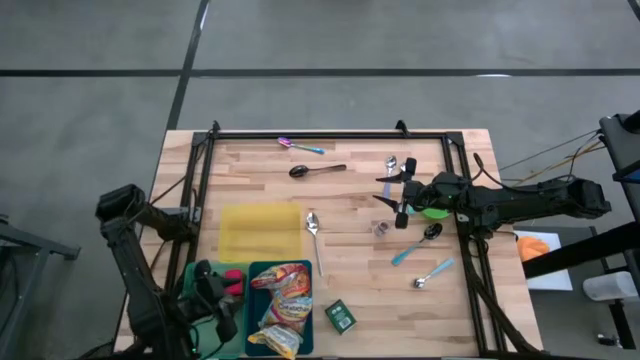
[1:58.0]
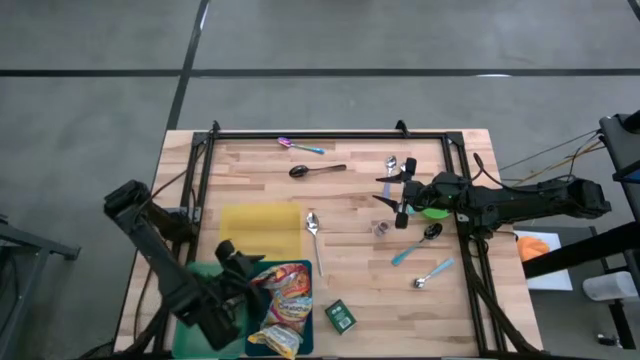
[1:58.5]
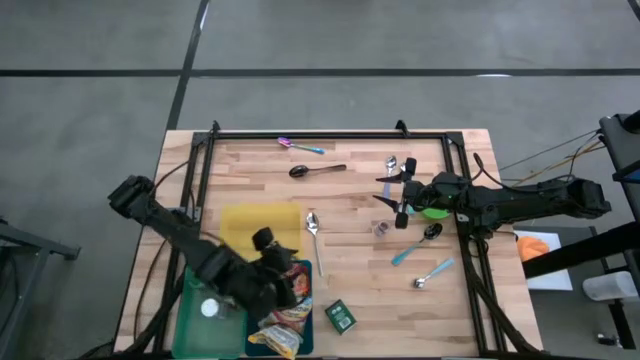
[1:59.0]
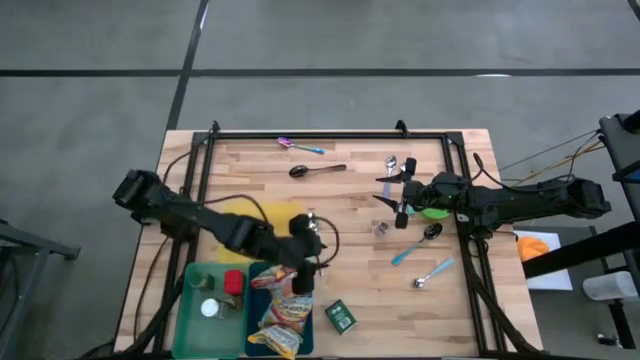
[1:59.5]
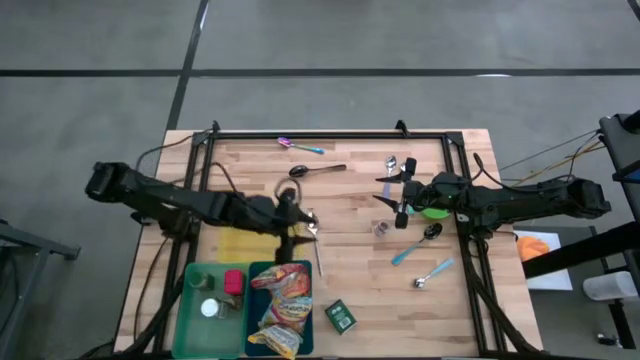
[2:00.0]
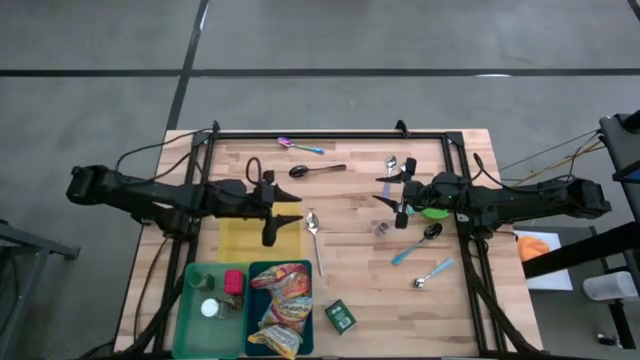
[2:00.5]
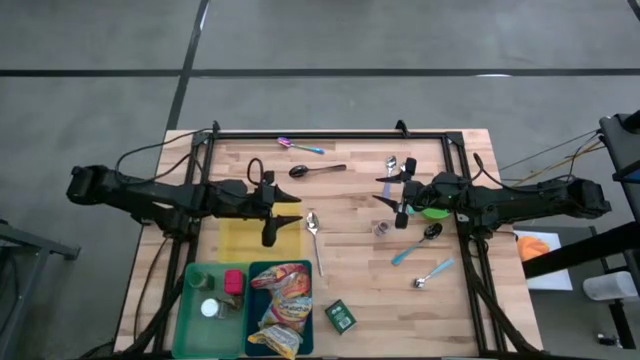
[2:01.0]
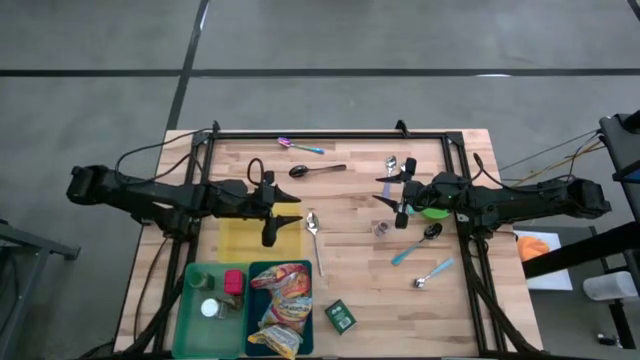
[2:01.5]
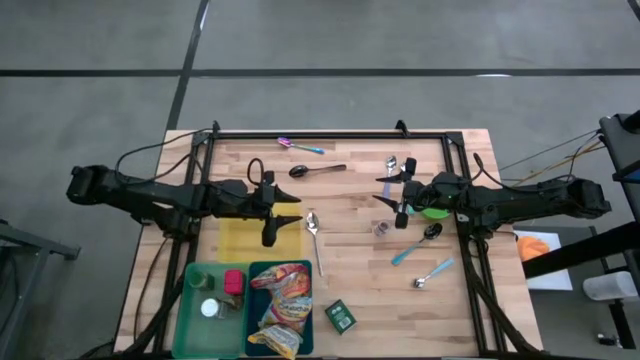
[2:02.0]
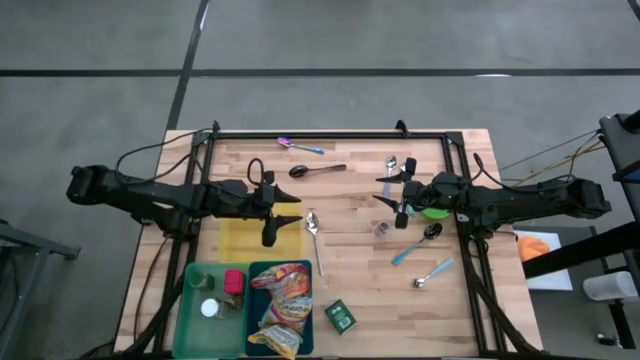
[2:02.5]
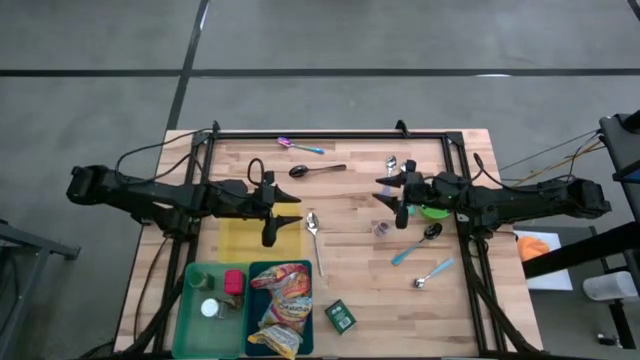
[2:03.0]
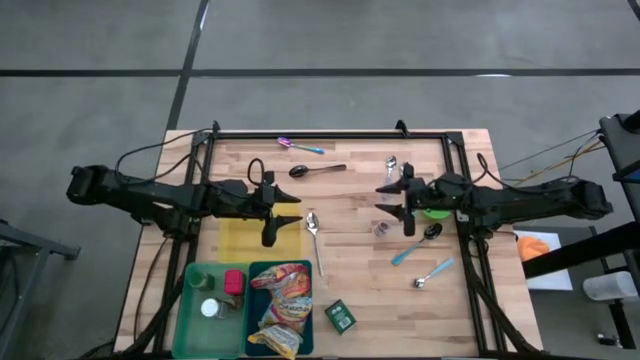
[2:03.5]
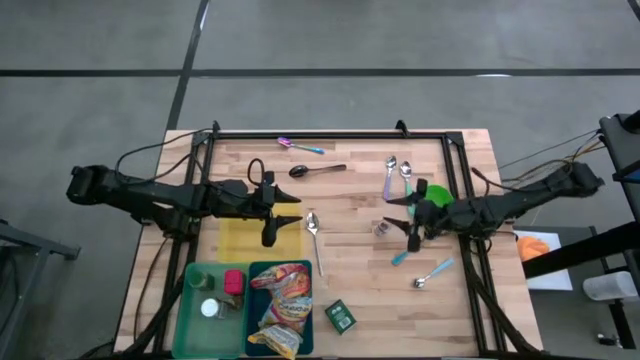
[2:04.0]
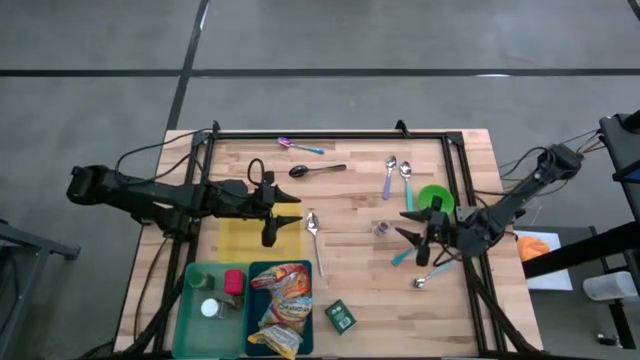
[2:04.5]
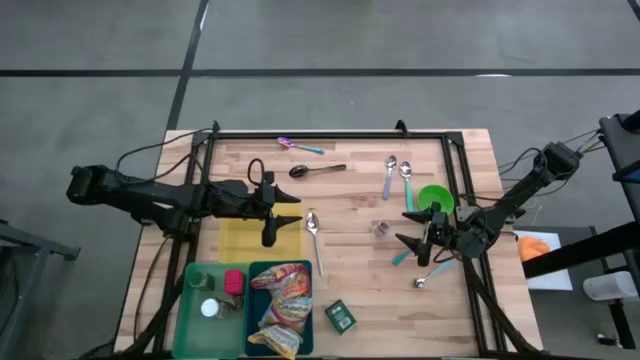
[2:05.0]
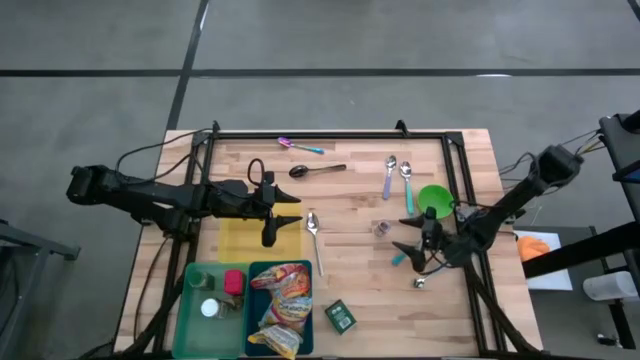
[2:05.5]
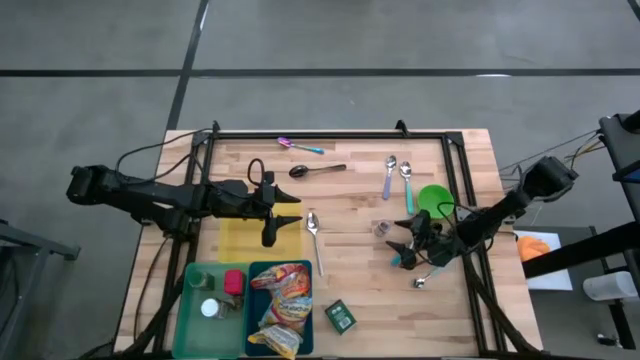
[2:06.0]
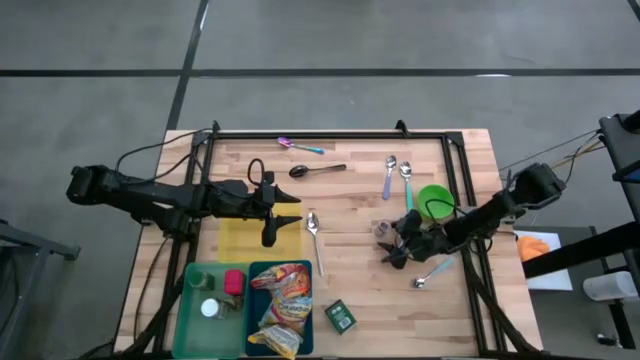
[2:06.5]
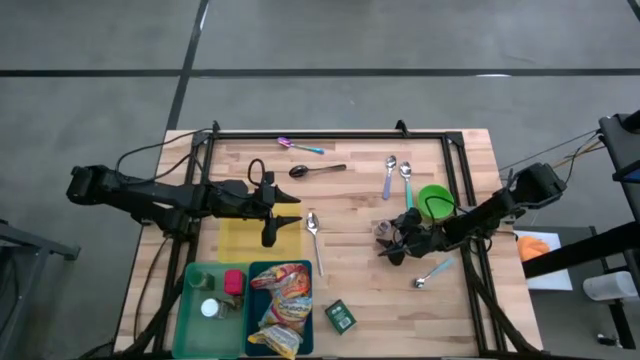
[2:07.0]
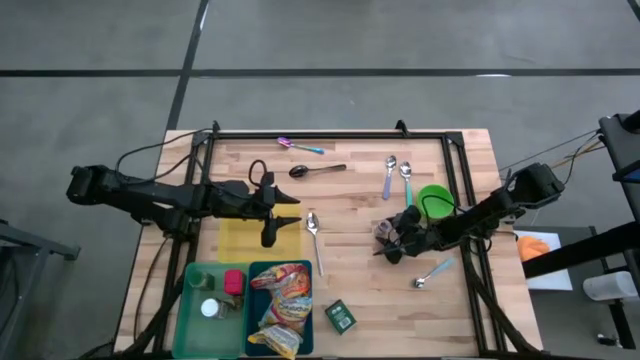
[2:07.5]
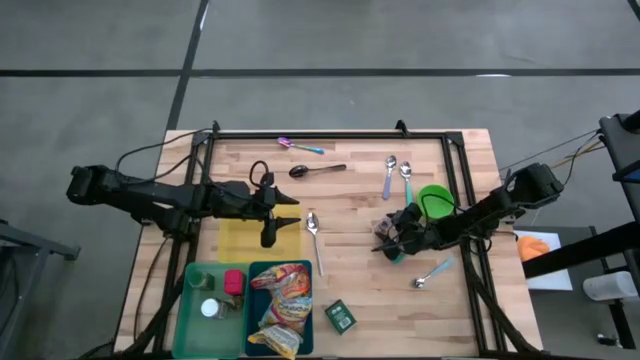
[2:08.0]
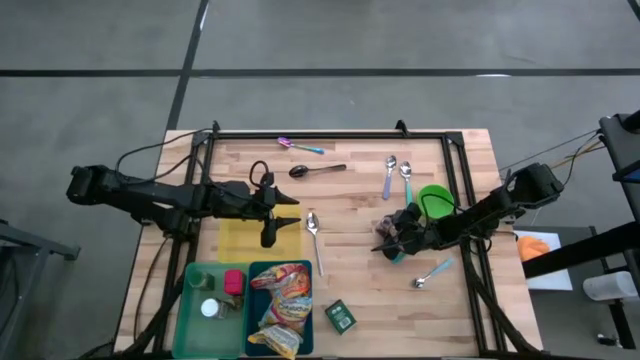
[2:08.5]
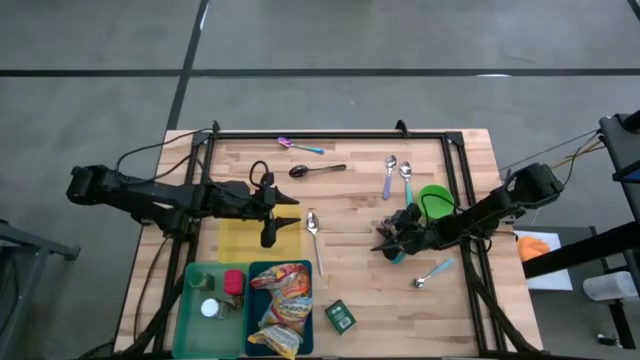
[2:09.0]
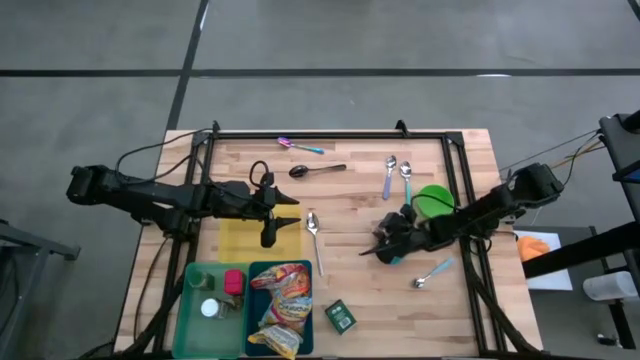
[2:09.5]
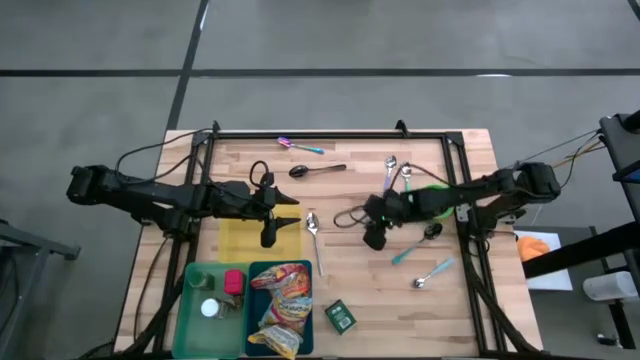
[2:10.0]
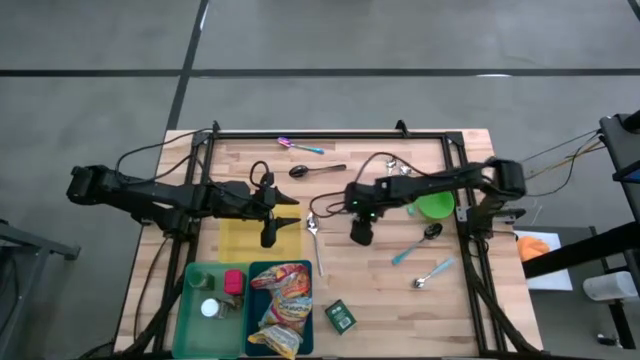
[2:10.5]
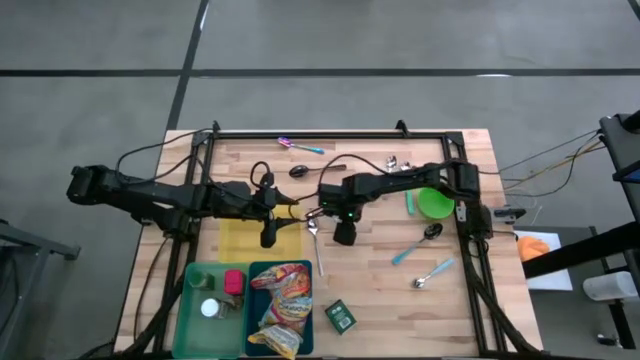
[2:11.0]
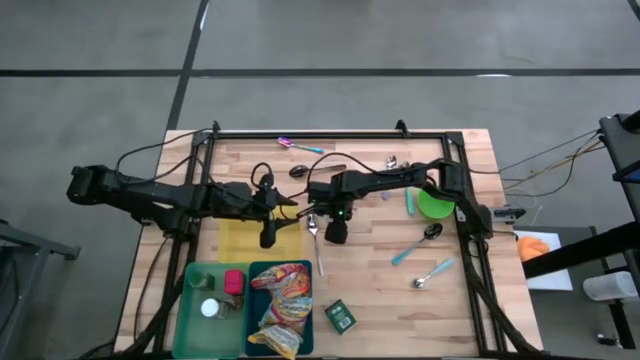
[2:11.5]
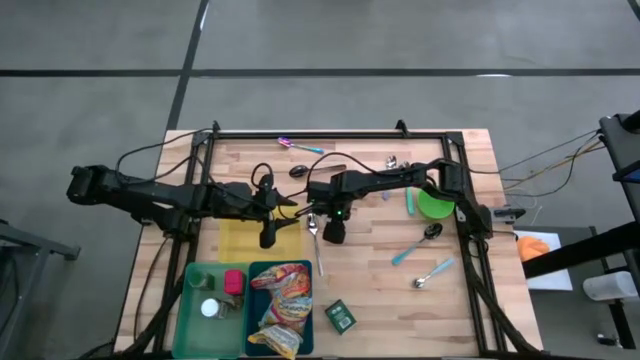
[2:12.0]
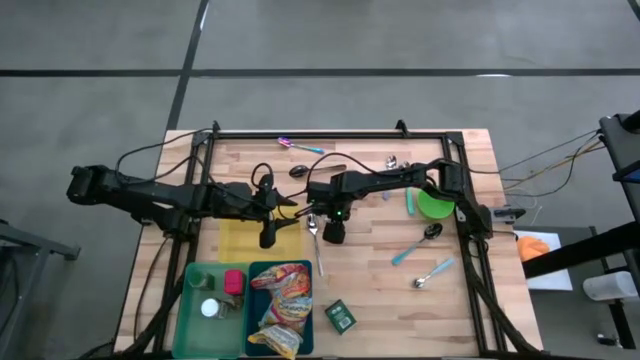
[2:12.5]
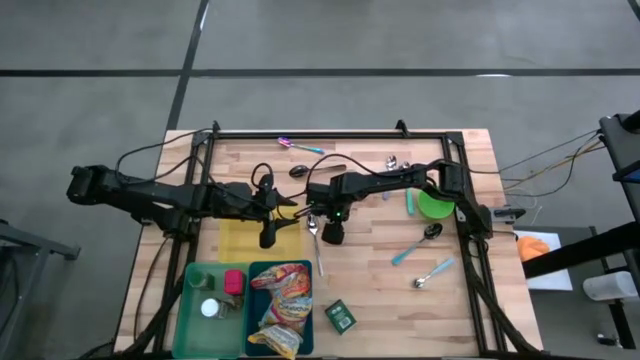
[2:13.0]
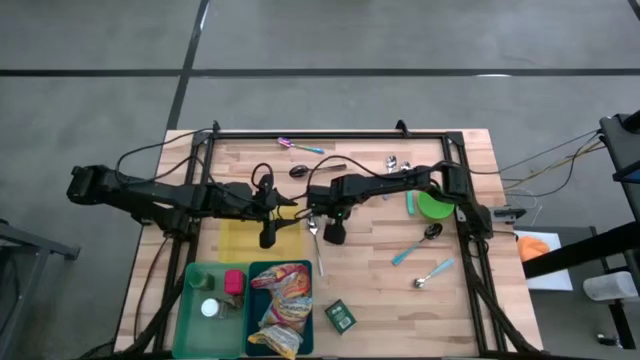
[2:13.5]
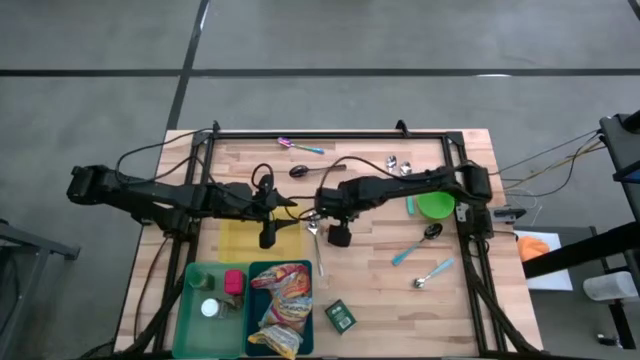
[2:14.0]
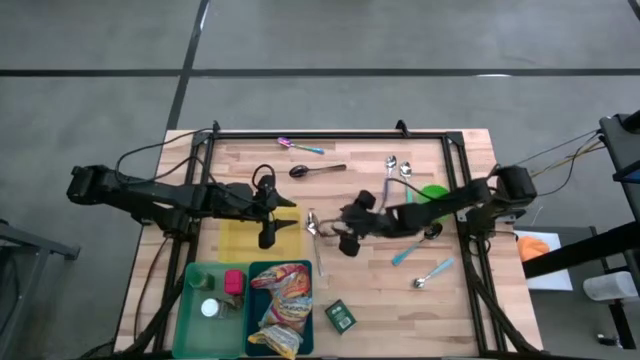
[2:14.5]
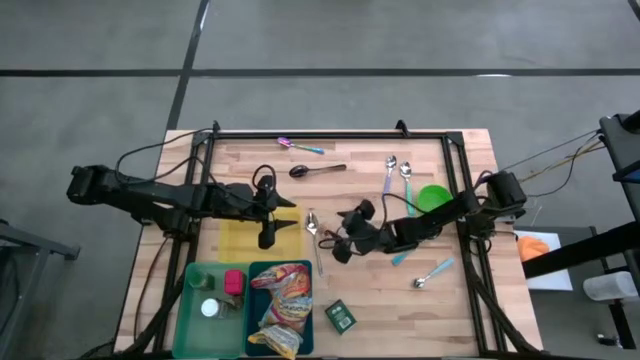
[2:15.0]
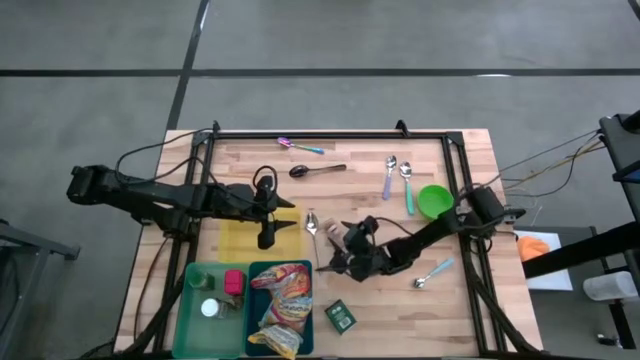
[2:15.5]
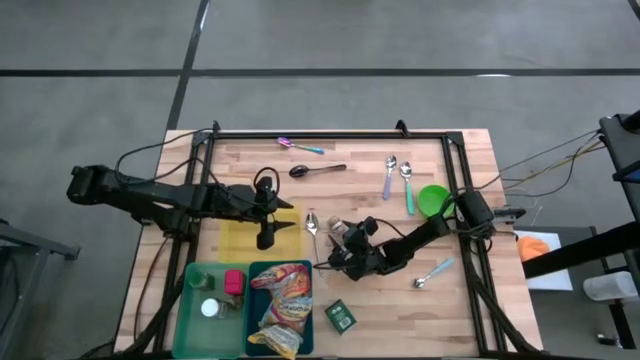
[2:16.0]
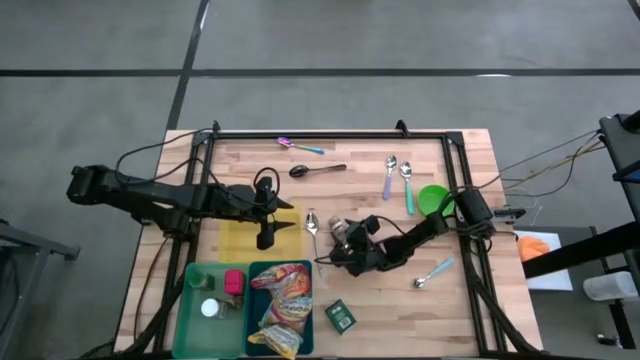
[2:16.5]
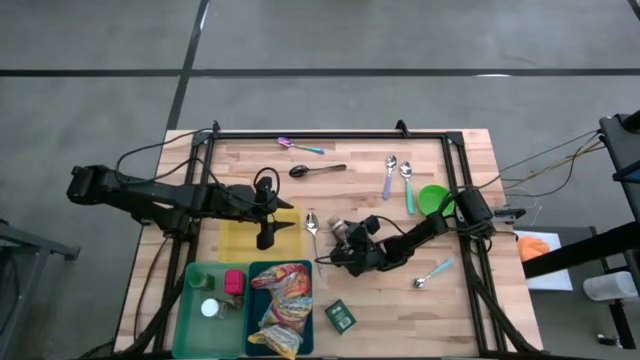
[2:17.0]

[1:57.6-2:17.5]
Put the brown spice bottle into the green bin
